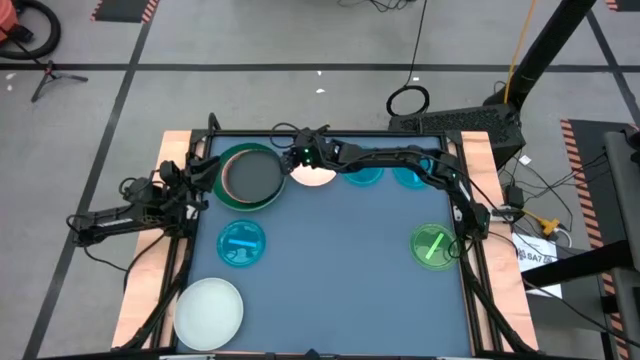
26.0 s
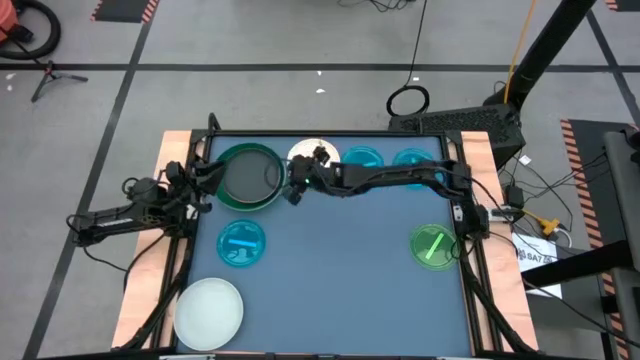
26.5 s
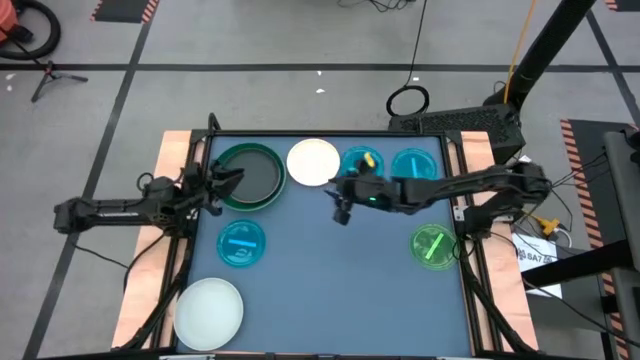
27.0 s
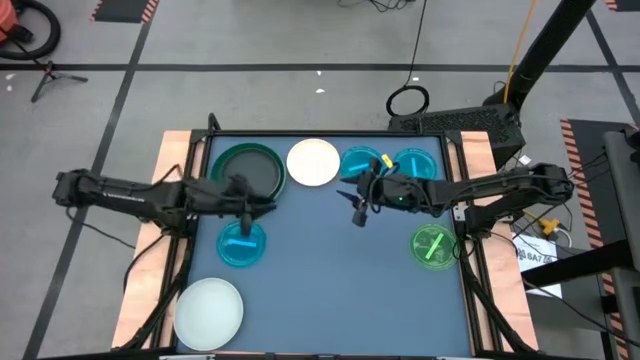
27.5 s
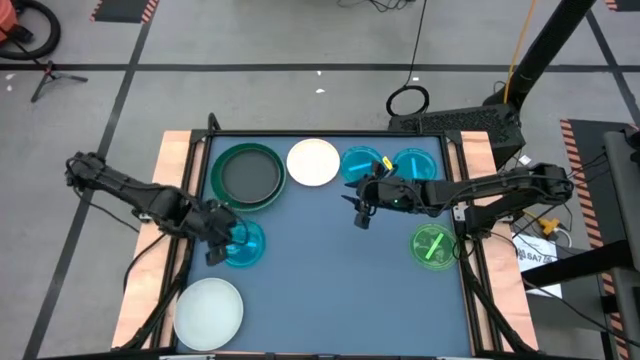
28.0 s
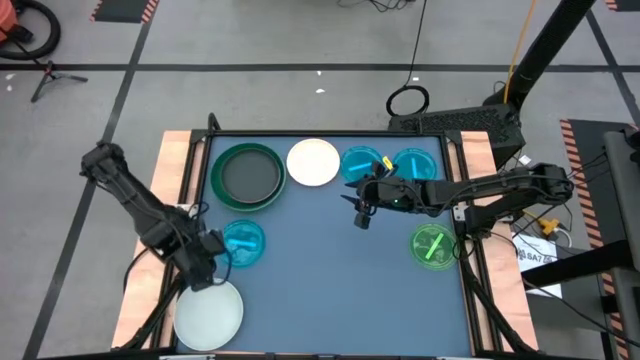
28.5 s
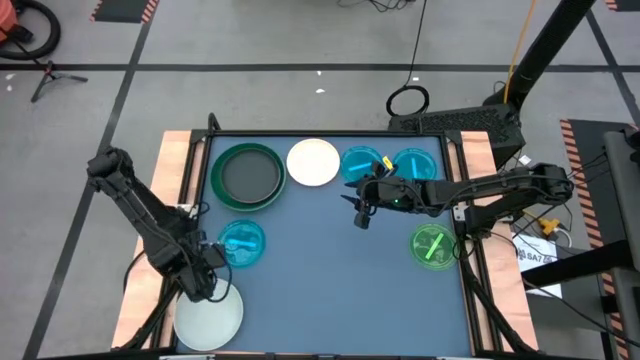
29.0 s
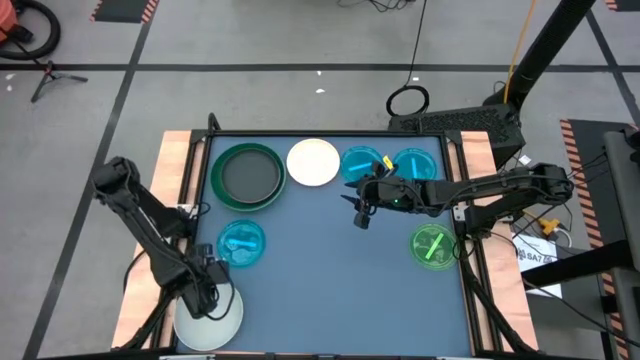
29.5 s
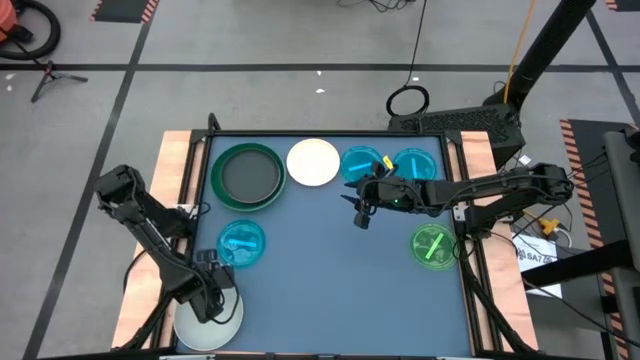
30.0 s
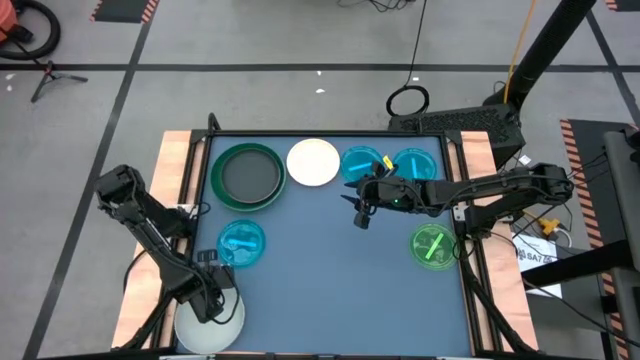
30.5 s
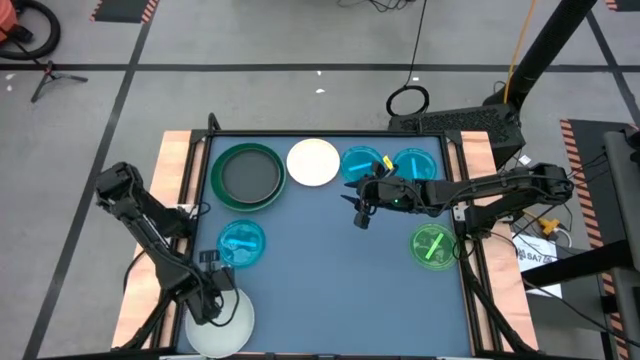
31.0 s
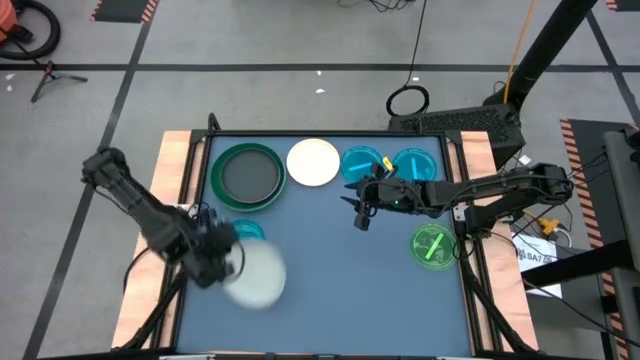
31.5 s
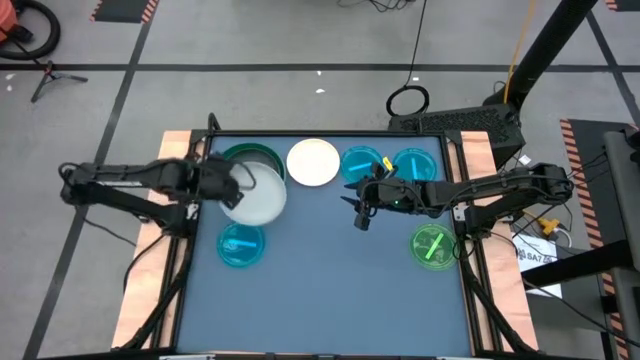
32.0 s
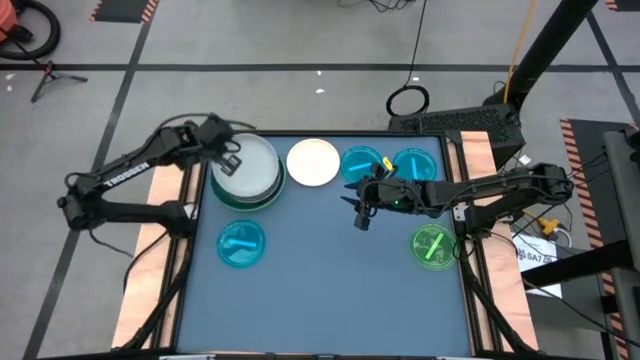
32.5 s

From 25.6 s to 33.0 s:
Task: Stack plastic plates
Stack the gray plate on top of the black plate

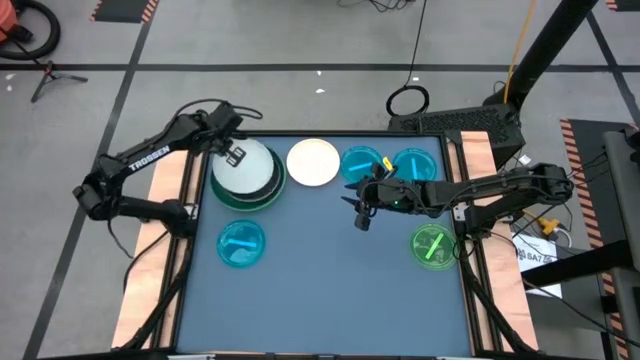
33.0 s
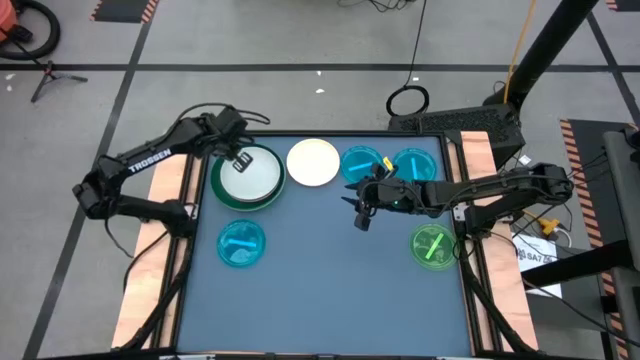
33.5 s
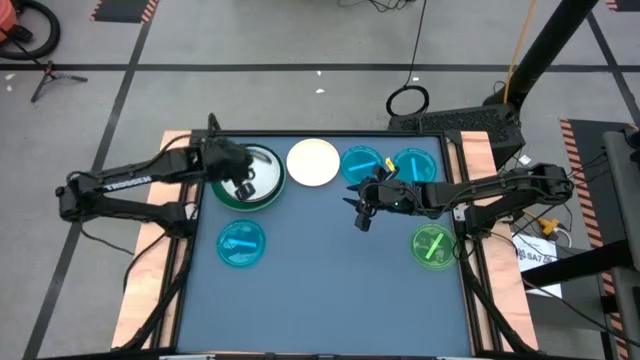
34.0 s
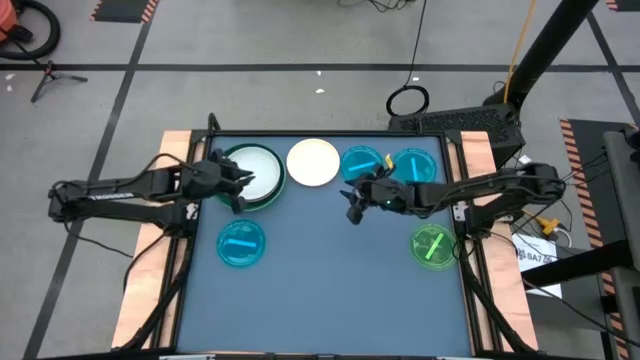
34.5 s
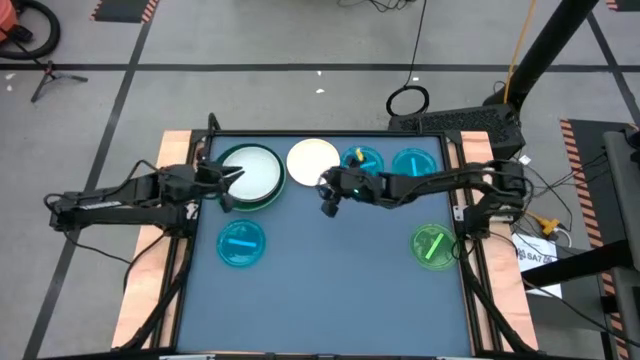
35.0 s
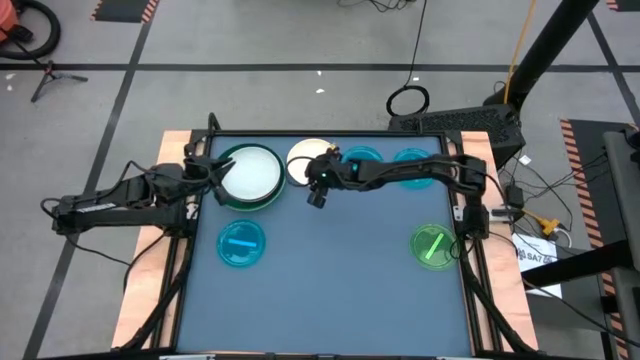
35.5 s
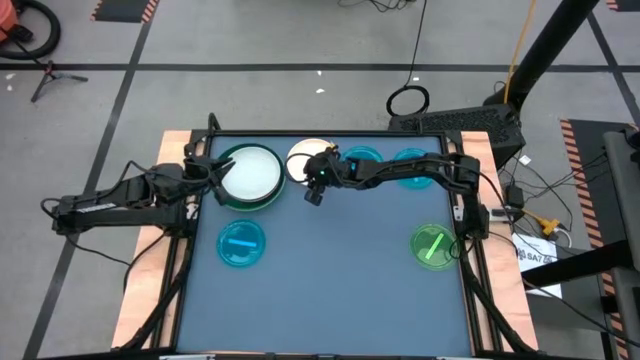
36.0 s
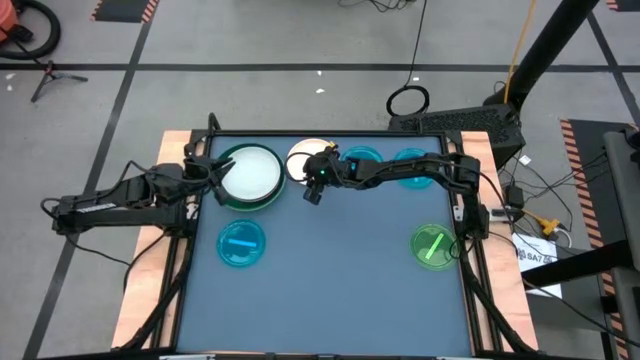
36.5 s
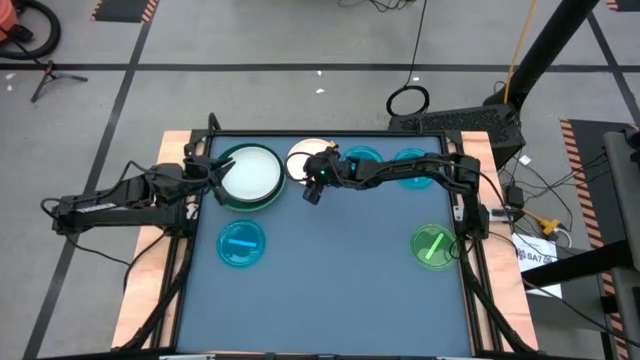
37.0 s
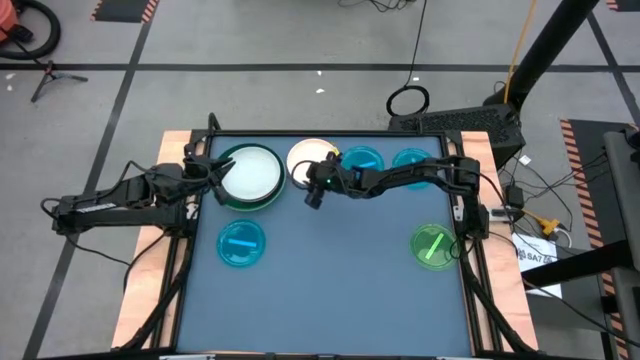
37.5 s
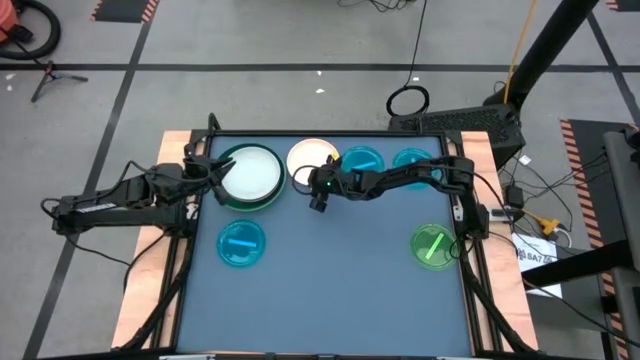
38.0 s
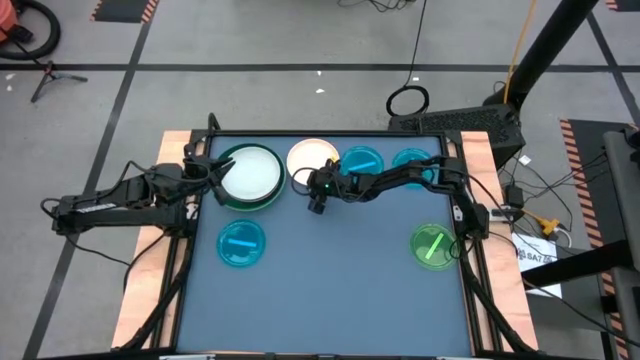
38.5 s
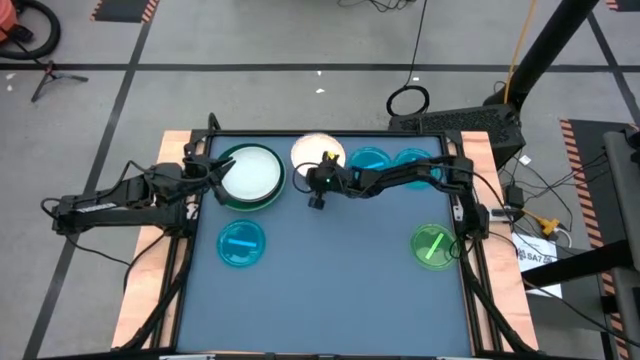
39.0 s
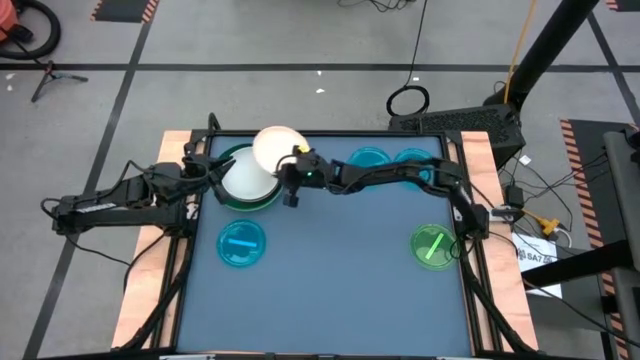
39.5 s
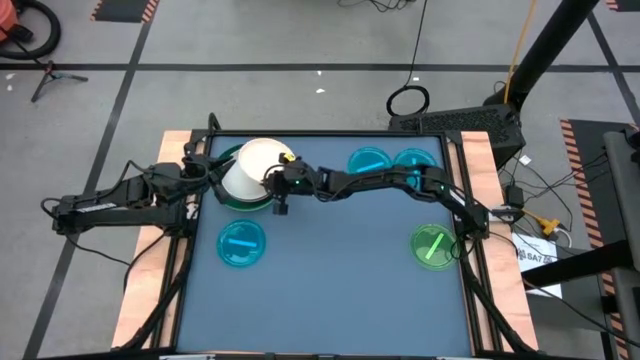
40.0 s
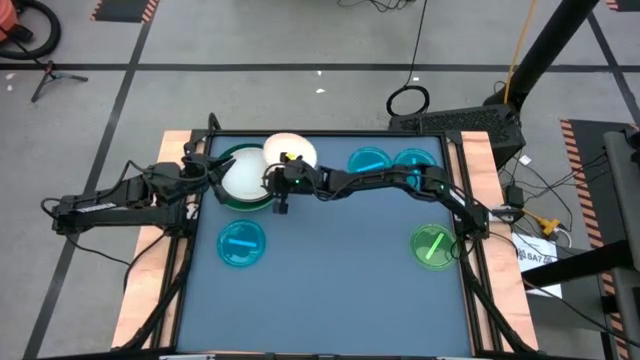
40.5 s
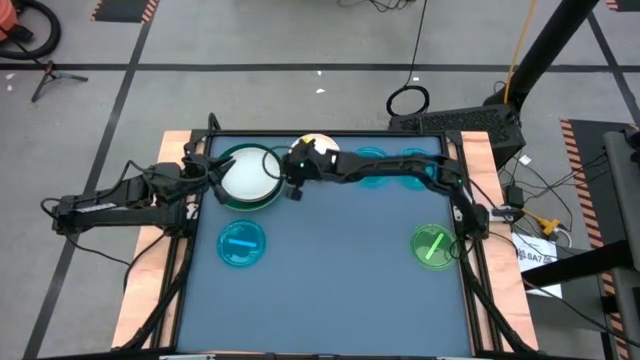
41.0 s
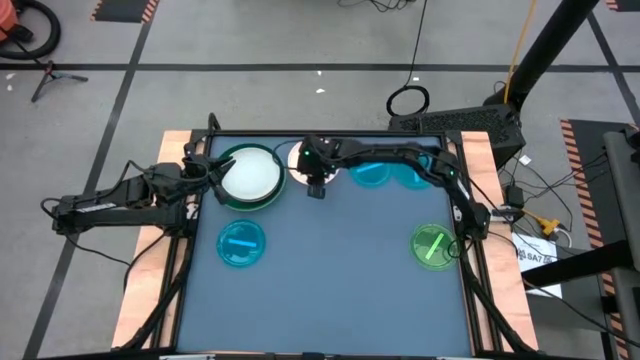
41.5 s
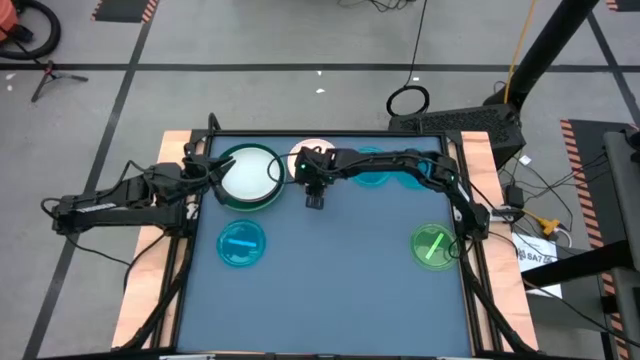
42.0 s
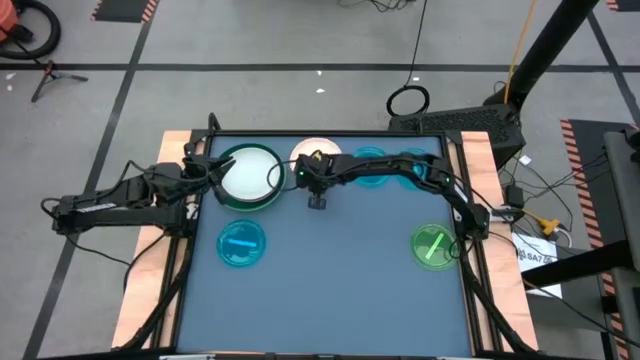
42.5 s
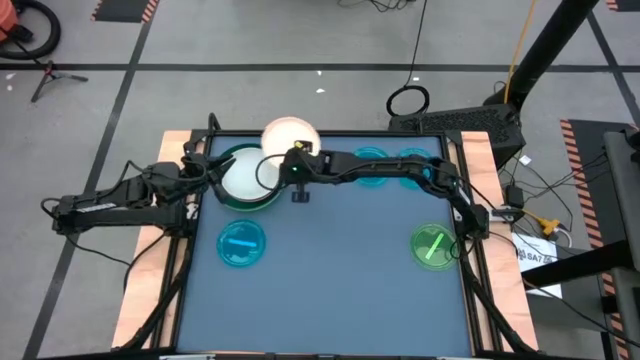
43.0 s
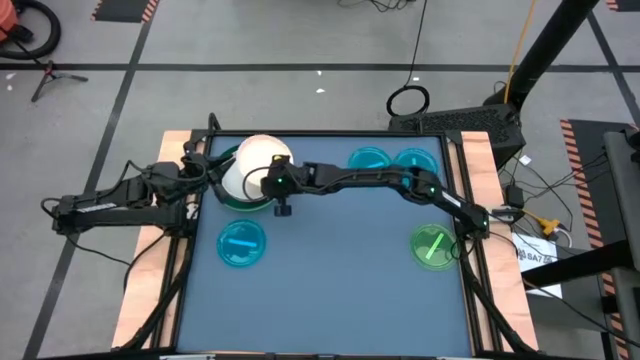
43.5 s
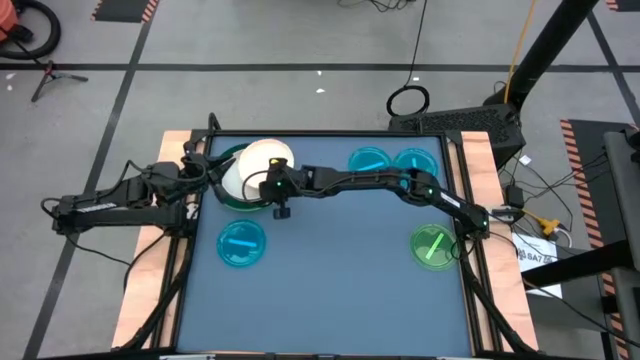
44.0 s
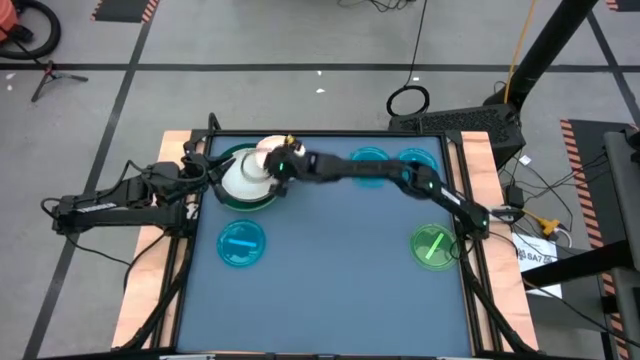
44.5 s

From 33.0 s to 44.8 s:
Stack the light orange plate on top of the gray plate

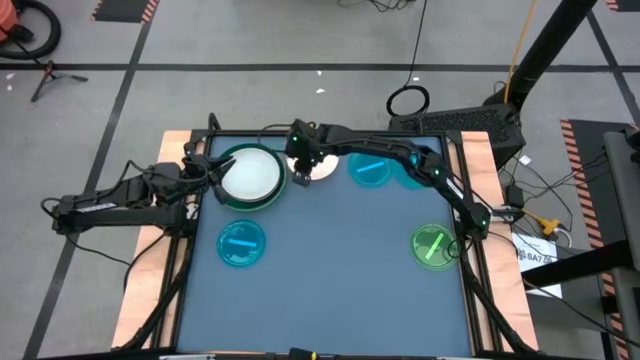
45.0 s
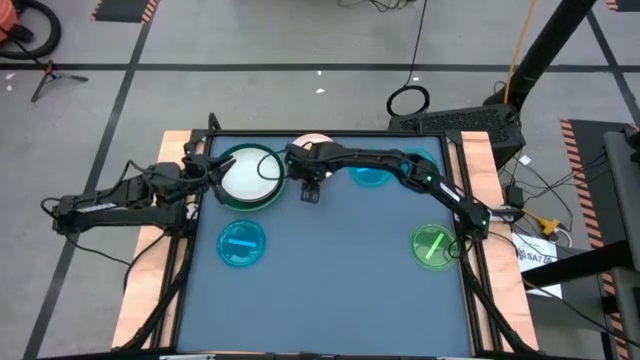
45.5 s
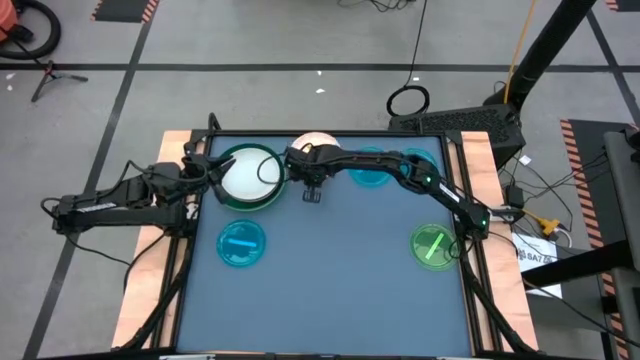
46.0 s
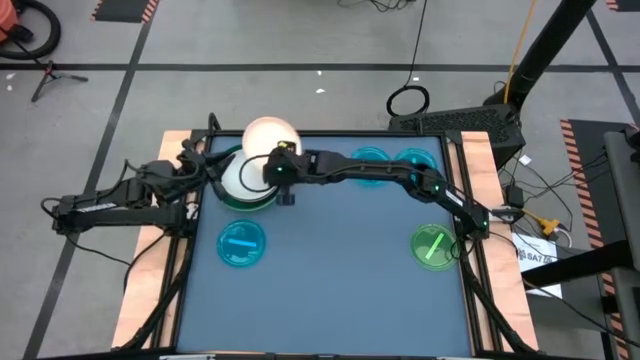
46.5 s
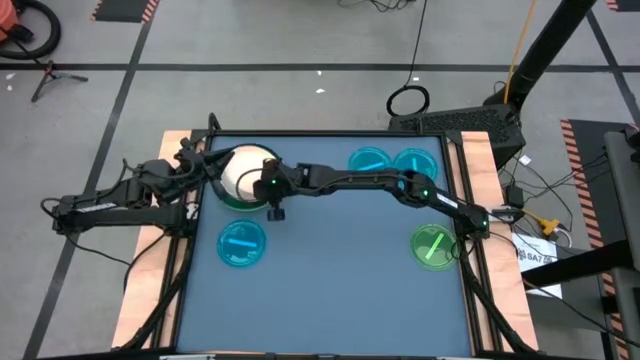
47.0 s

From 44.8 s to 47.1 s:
Stack the light orange plate on top of the gray plate

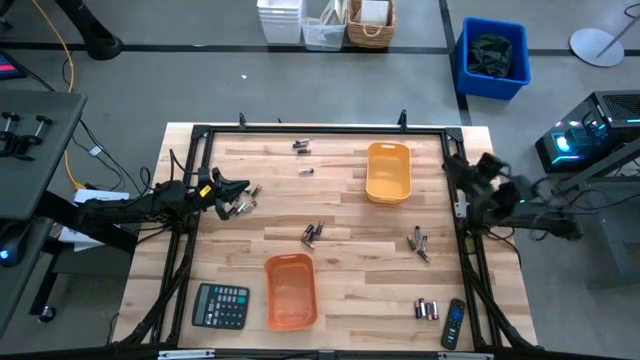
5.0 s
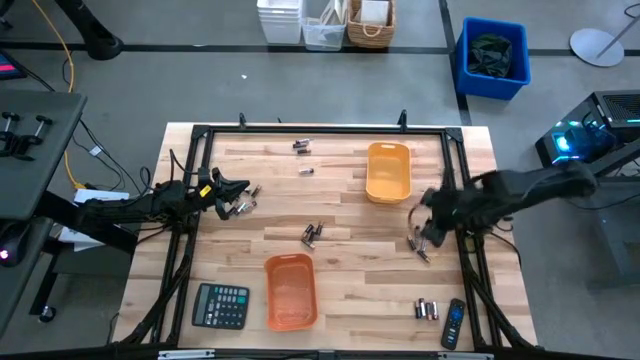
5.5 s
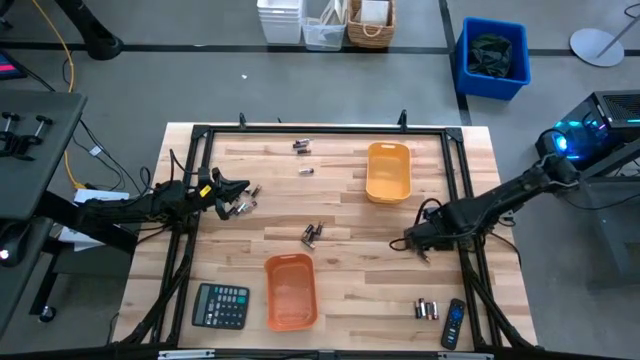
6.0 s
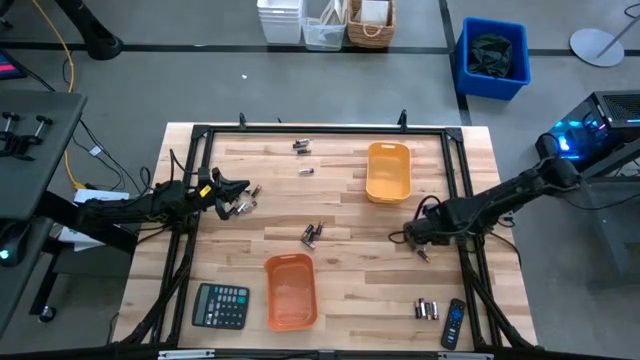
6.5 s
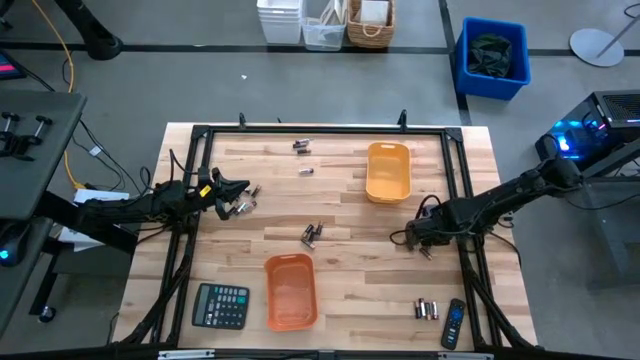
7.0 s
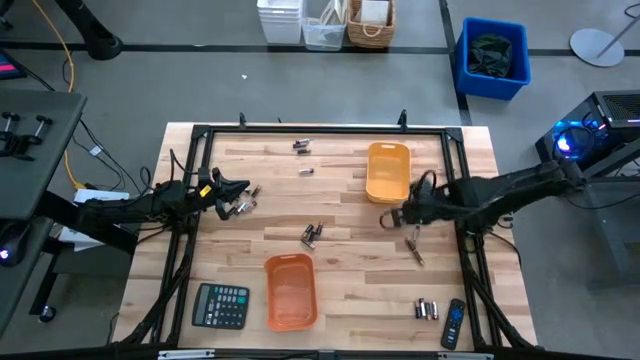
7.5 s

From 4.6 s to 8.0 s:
Task: Sort batteries
Put the silver battery into the yellow bin
